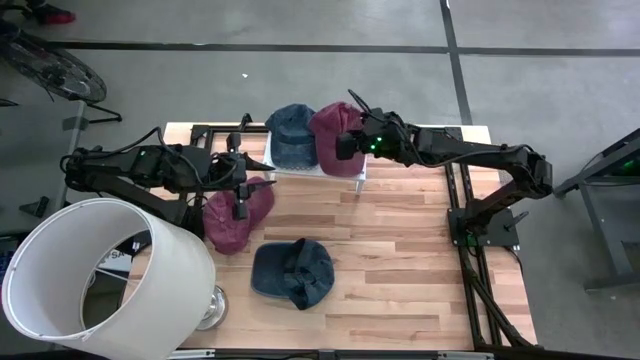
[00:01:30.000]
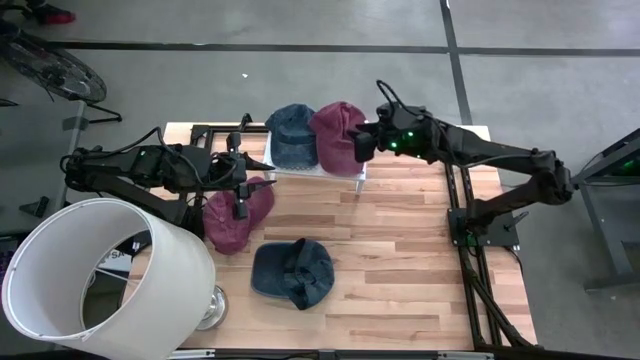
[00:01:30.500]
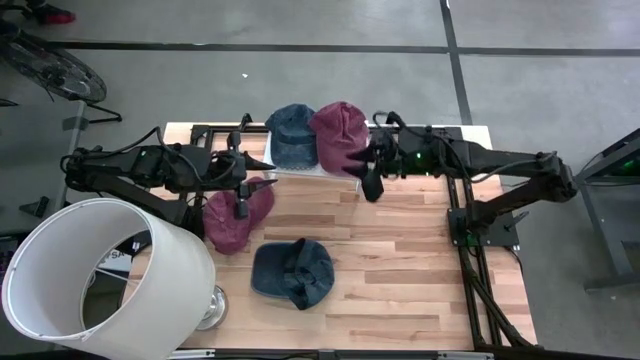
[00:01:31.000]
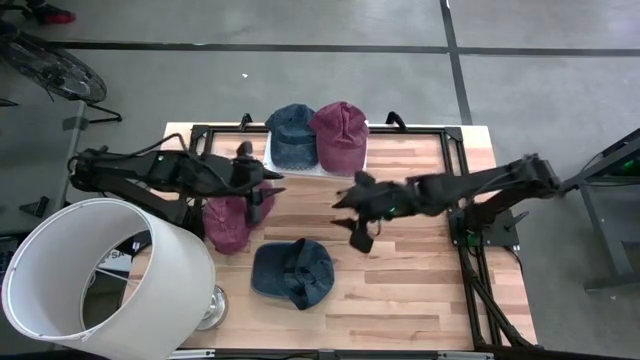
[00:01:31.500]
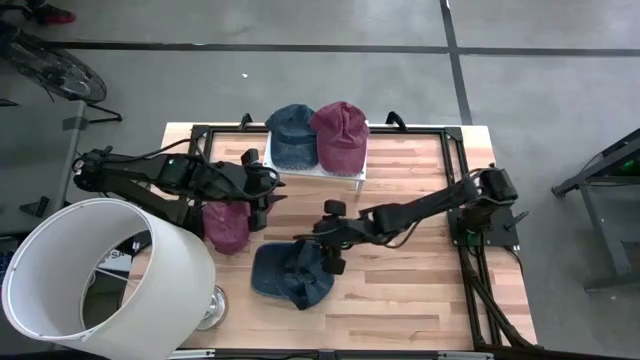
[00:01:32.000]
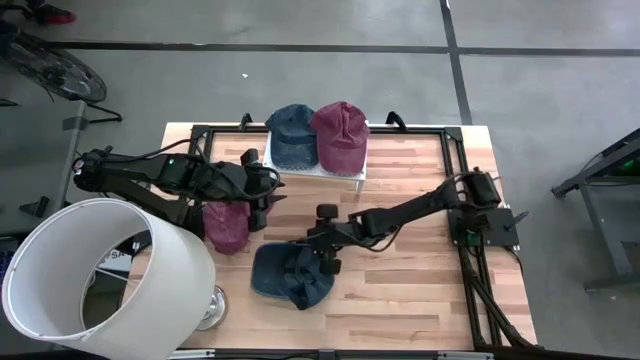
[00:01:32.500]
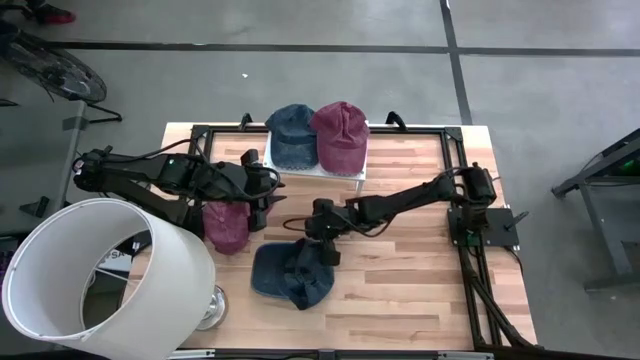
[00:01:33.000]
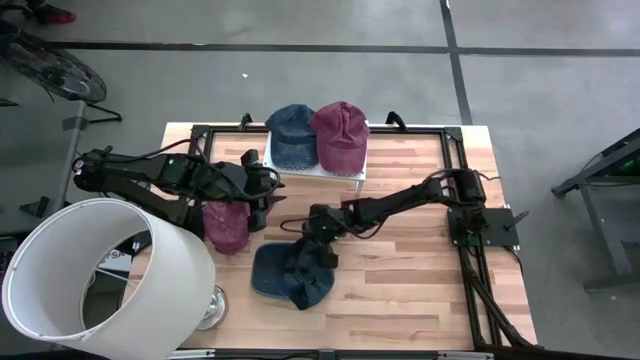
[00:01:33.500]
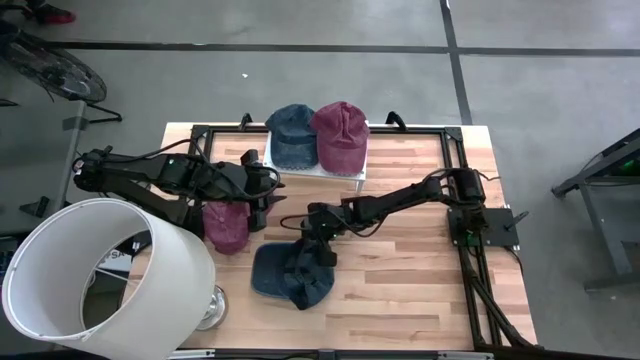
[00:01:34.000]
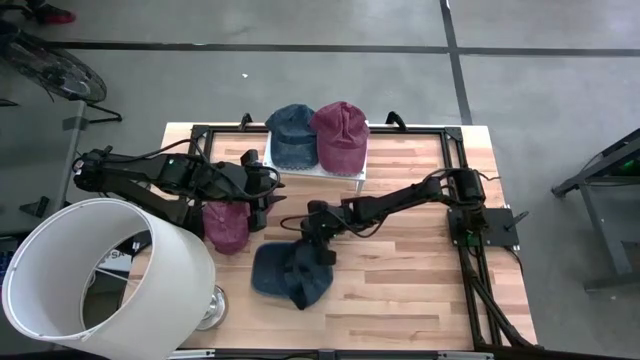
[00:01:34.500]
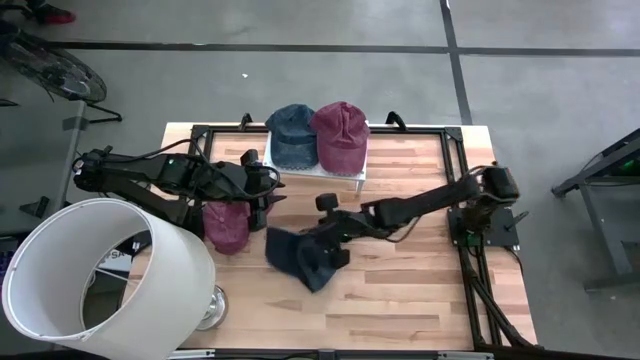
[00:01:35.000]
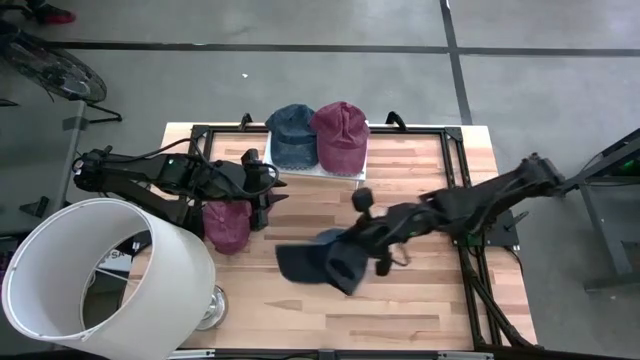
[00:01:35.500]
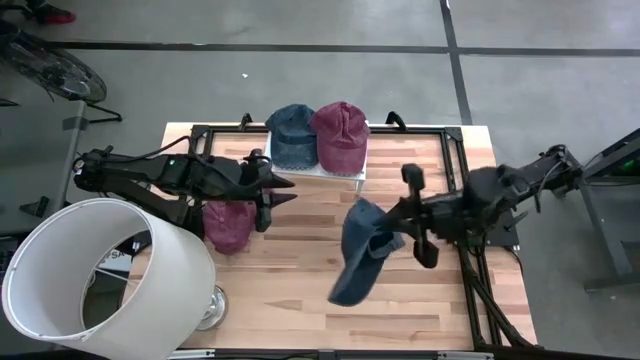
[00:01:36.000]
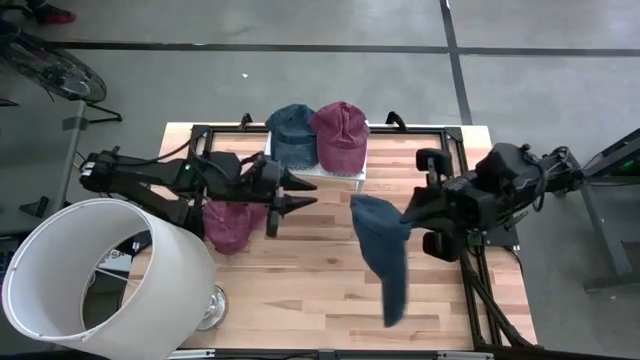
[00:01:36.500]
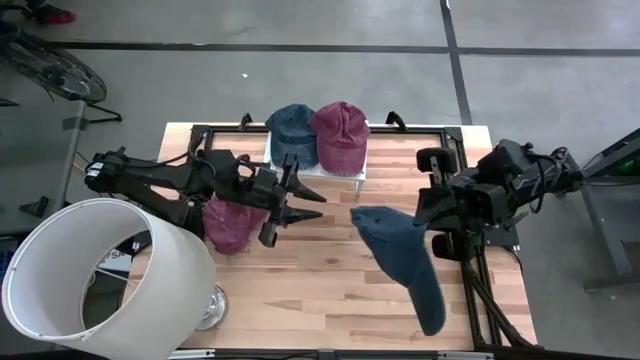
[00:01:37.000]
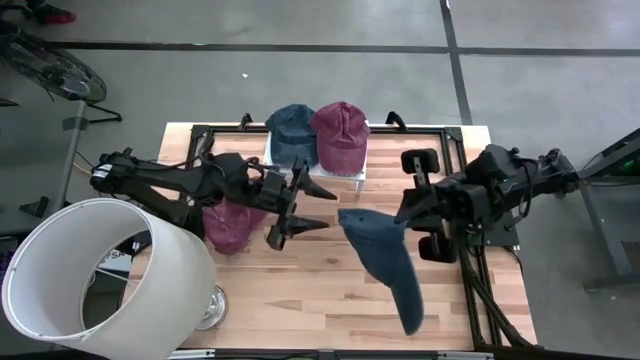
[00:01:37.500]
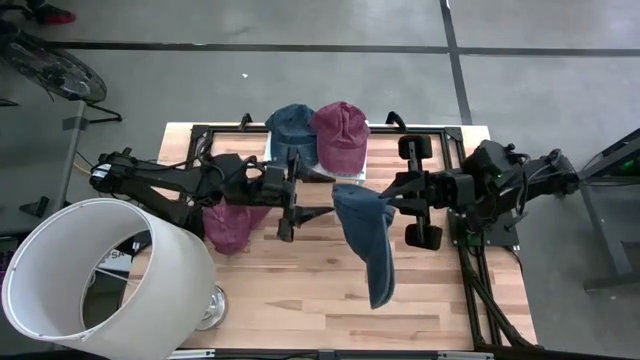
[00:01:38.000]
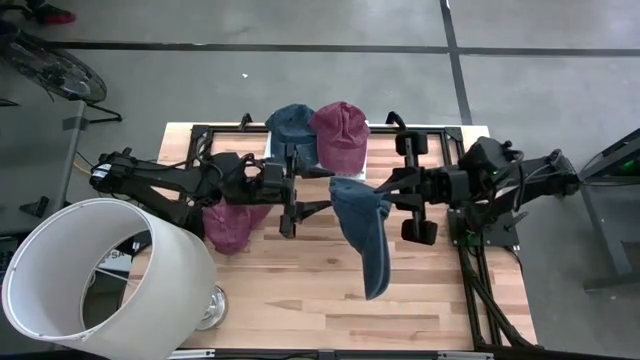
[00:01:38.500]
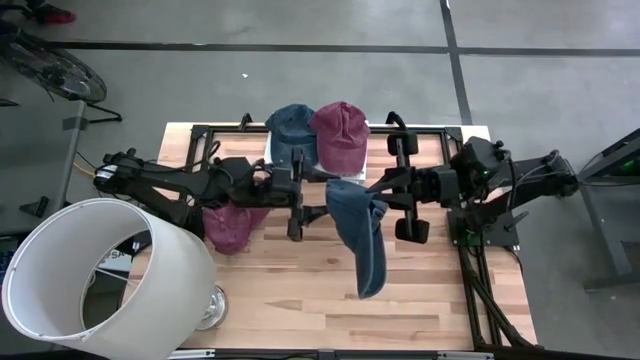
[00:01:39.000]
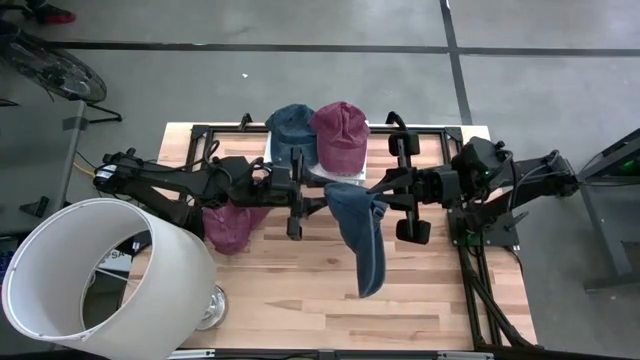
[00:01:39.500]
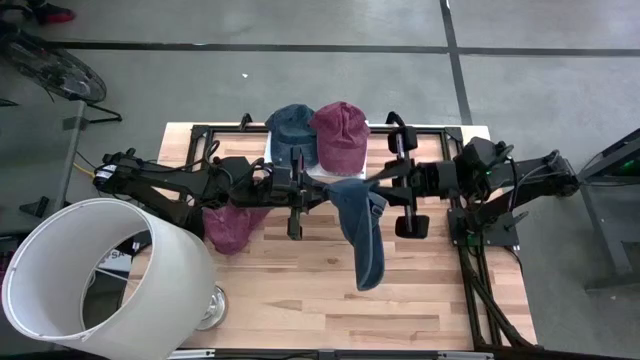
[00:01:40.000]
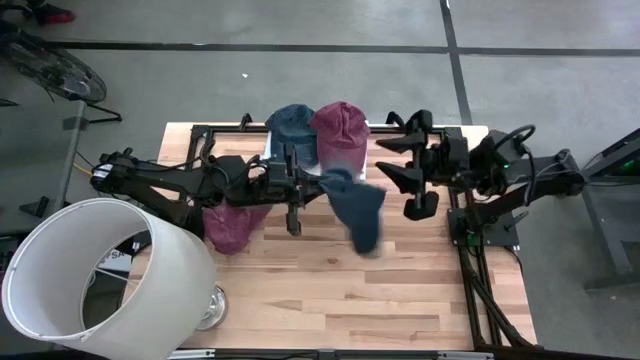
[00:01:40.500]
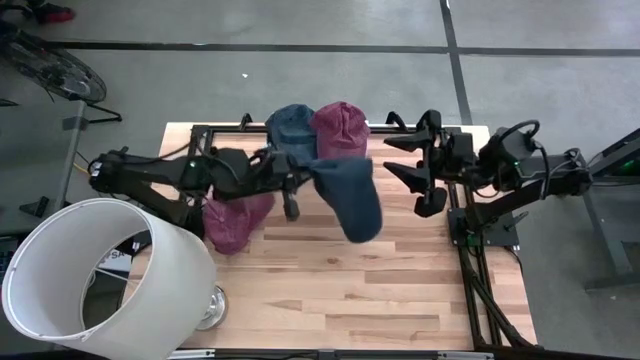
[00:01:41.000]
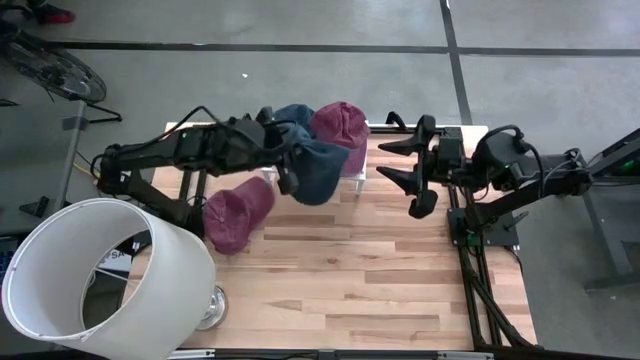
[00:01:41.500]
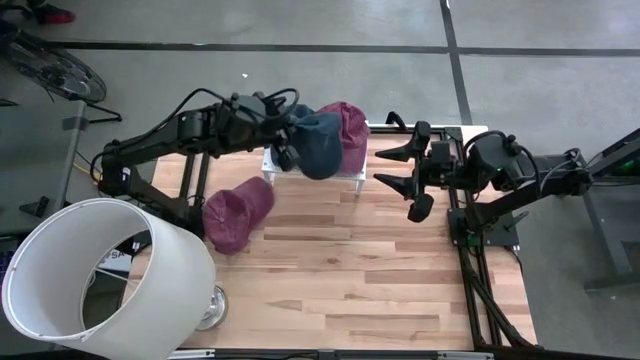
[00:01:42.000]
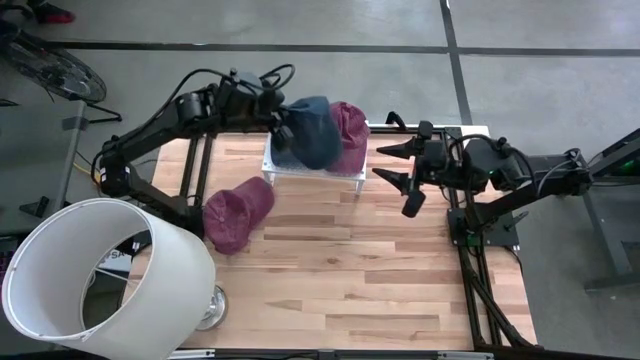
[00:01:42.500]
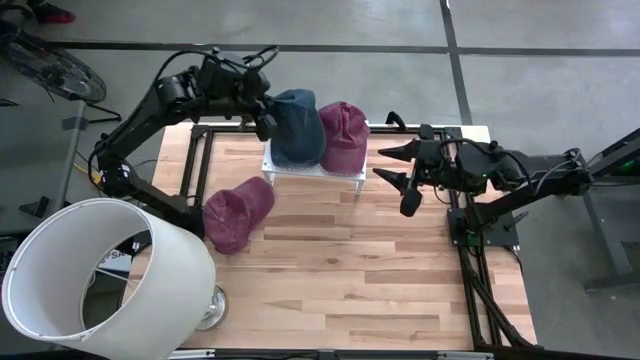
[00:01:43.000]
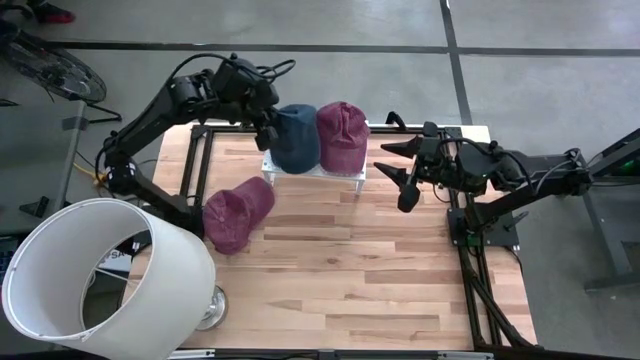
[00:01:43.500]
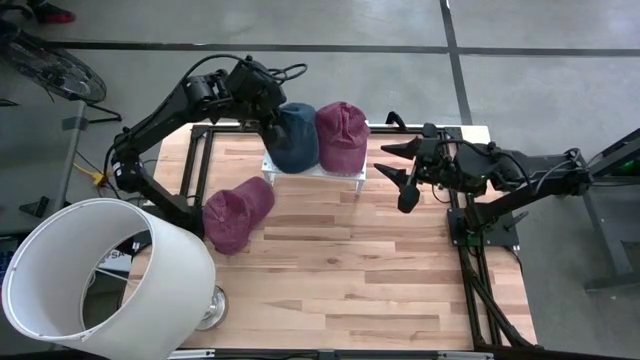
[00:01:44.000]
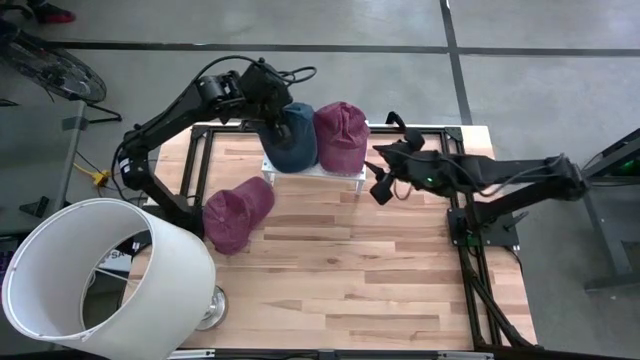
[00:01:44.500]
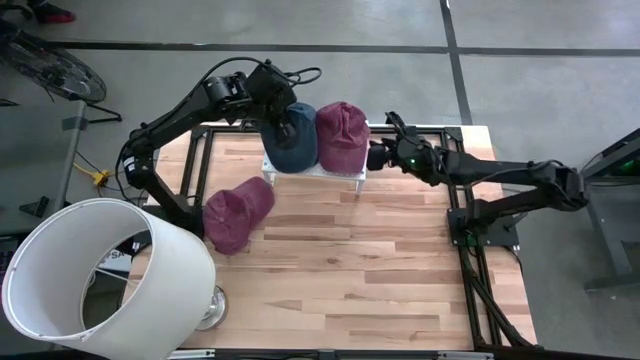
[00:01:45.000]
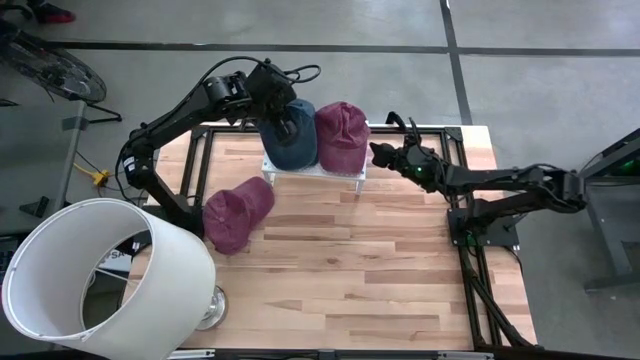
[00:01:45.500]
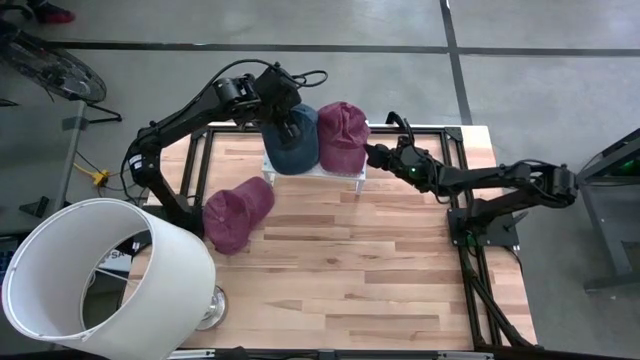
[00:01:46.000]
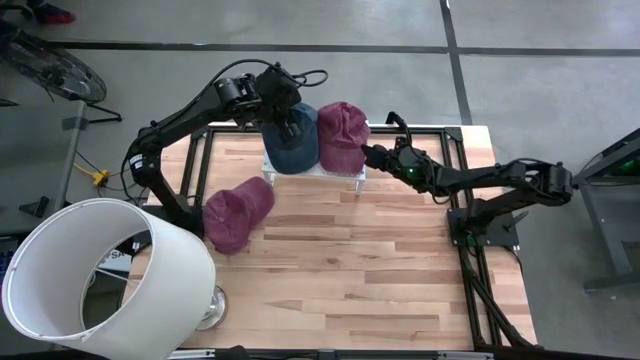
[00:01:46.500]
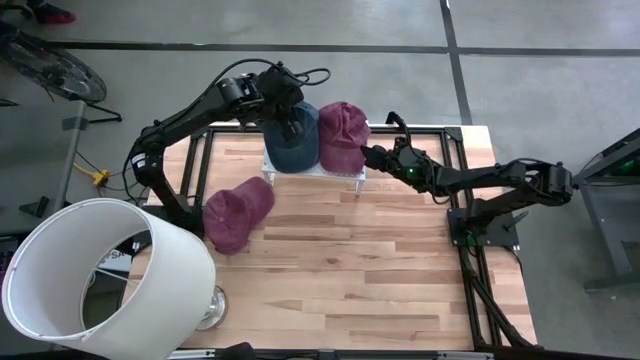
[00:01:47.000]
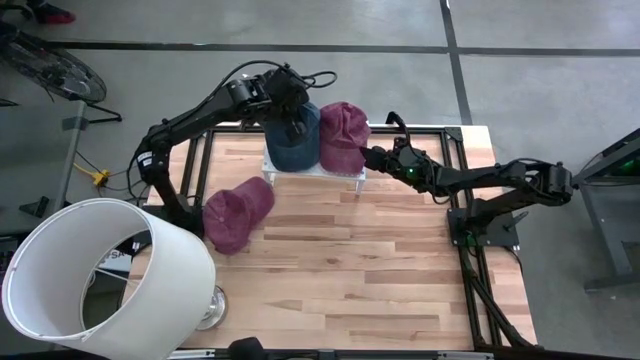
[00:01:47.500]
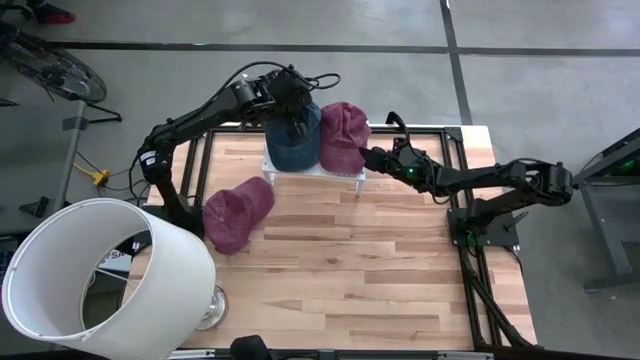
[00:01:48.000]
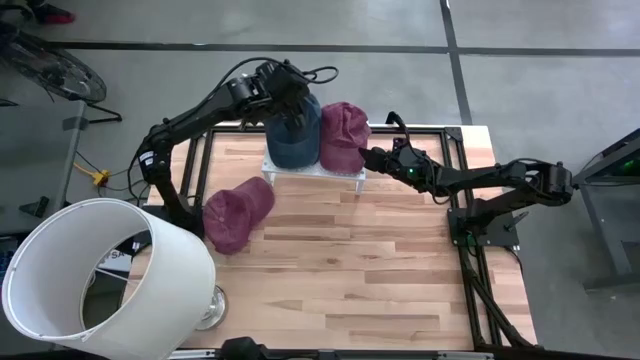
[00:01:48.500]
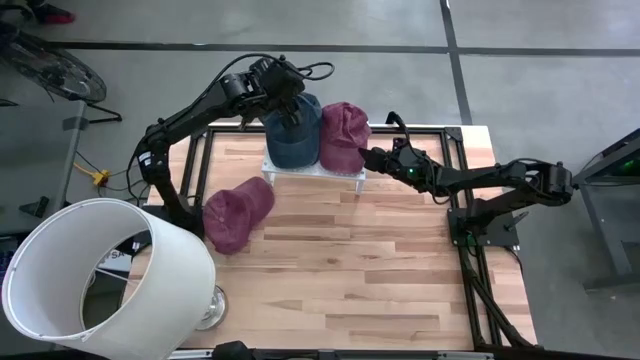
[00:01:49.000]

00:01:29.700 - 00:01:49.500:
Task: Pick & Place hat
Stack the black cap on top of the black cap on the shelf
